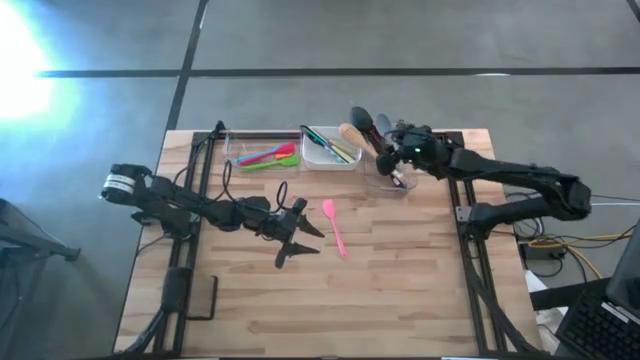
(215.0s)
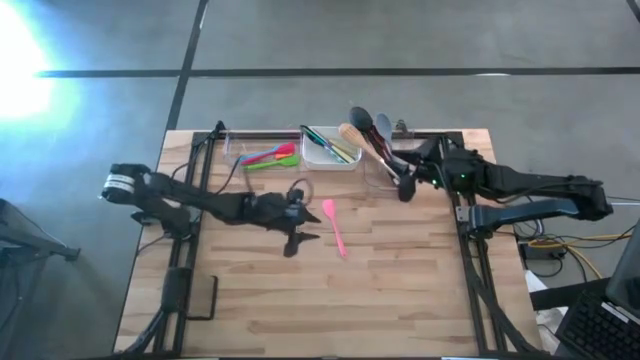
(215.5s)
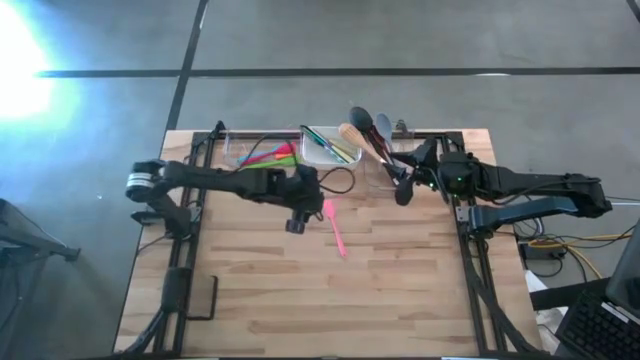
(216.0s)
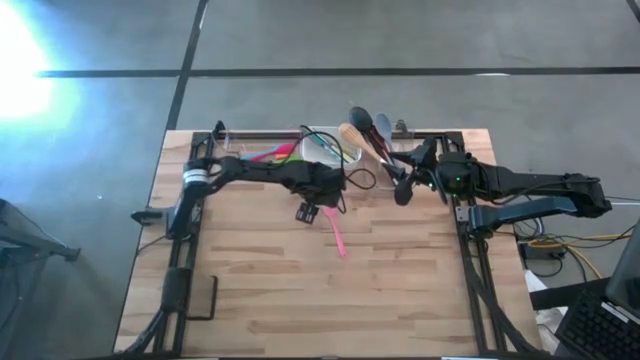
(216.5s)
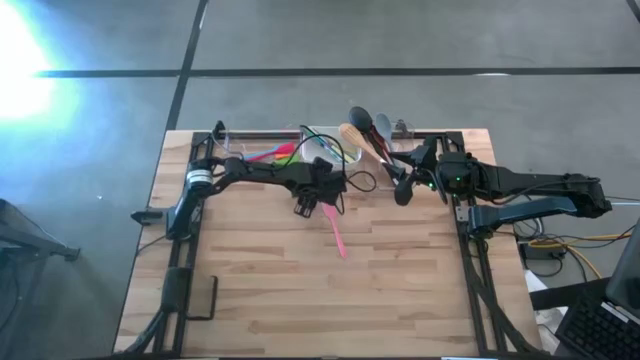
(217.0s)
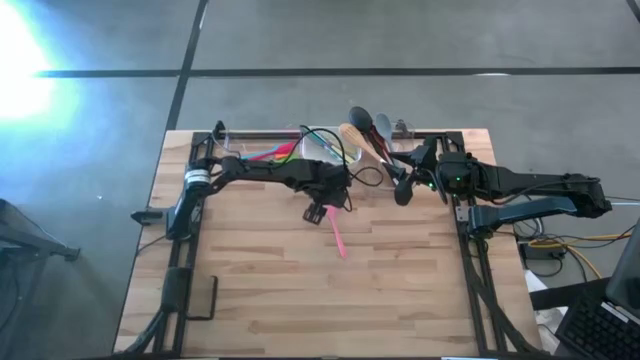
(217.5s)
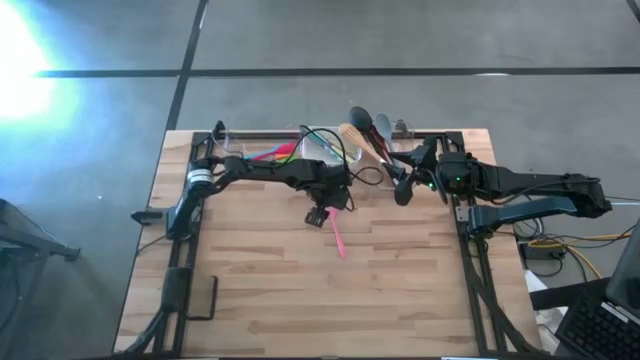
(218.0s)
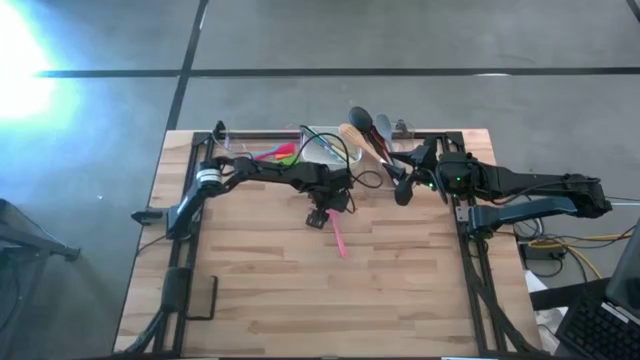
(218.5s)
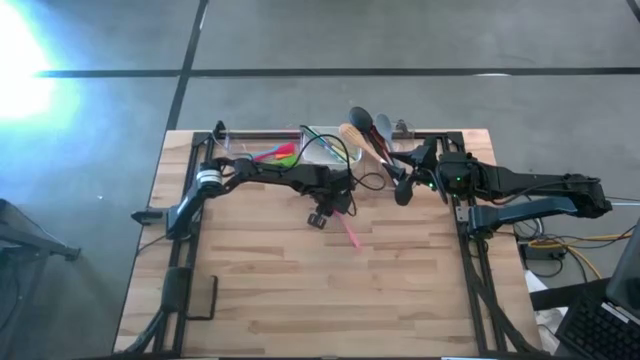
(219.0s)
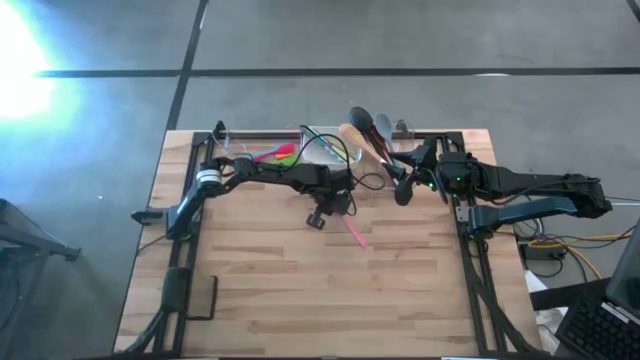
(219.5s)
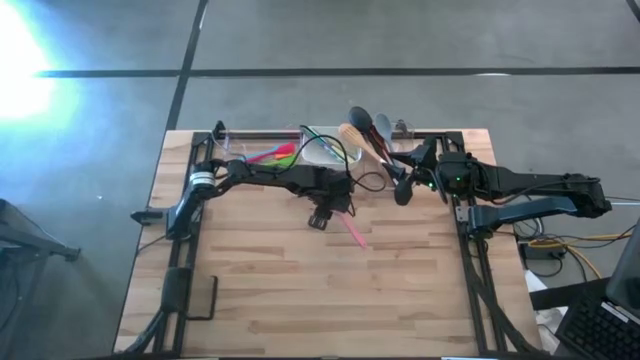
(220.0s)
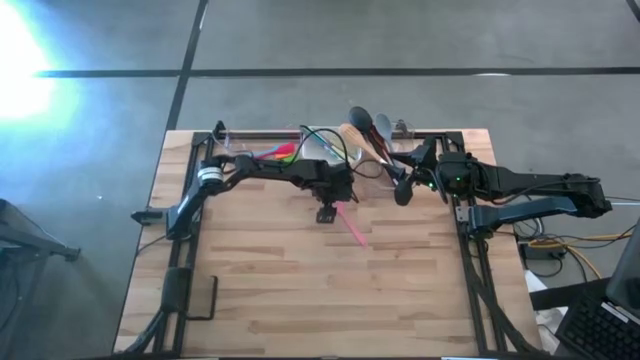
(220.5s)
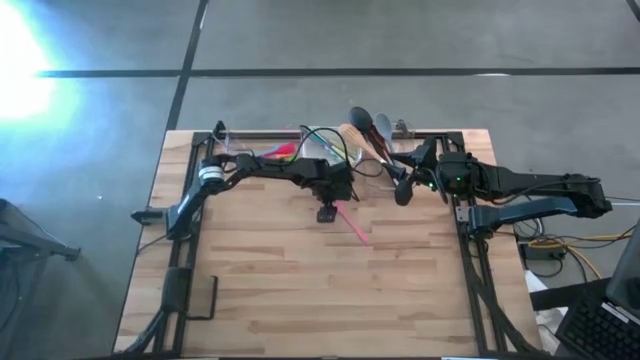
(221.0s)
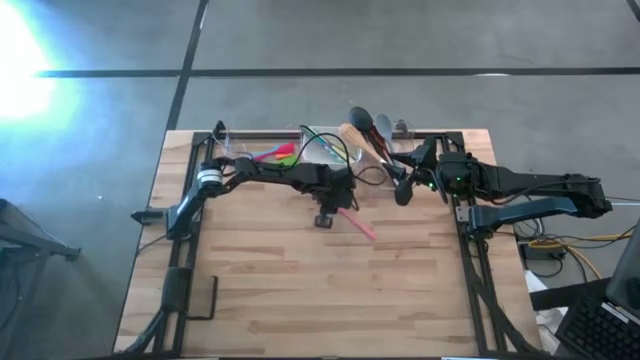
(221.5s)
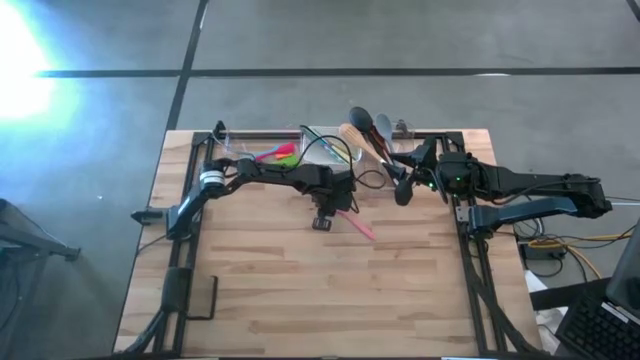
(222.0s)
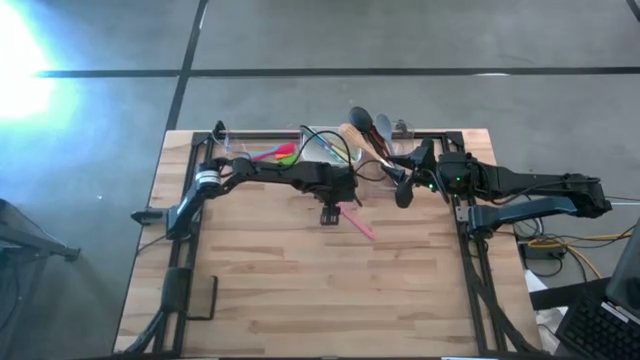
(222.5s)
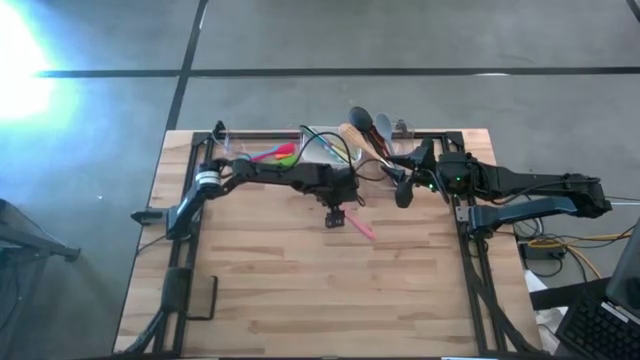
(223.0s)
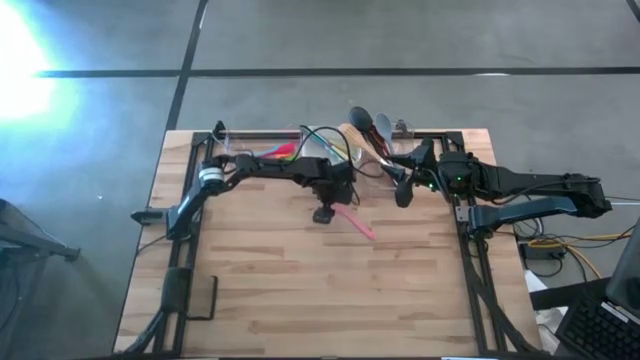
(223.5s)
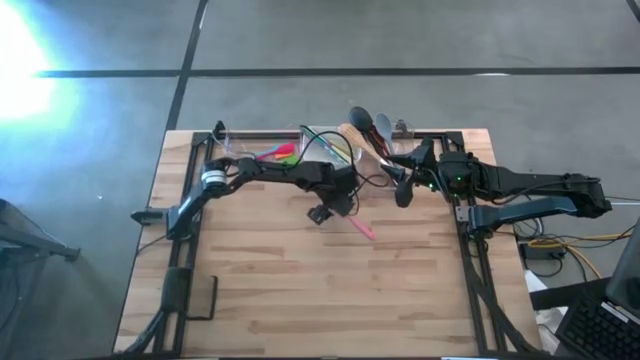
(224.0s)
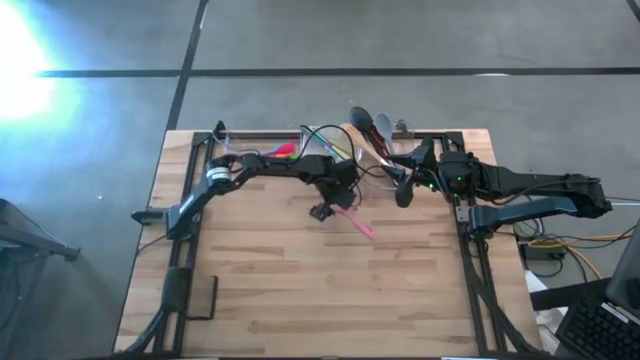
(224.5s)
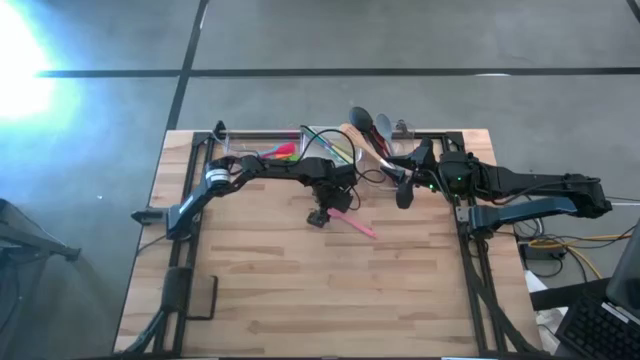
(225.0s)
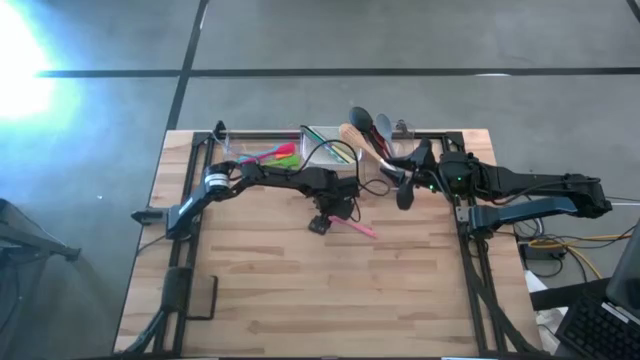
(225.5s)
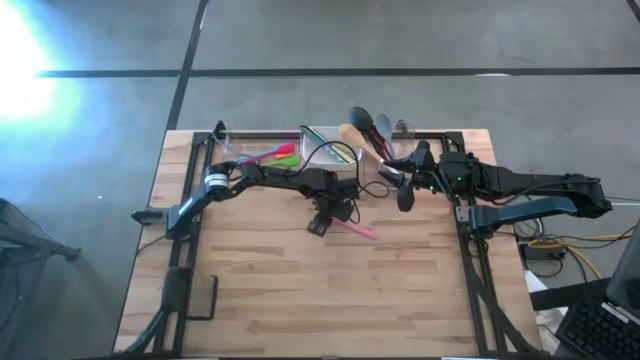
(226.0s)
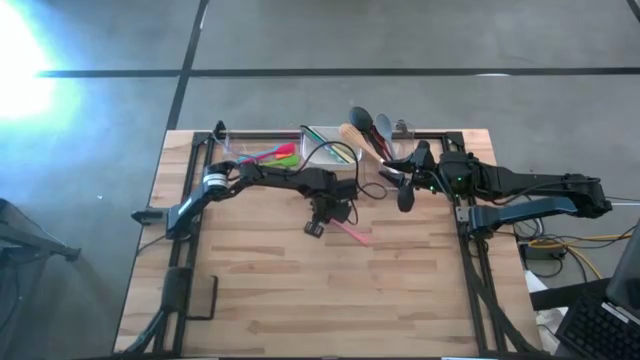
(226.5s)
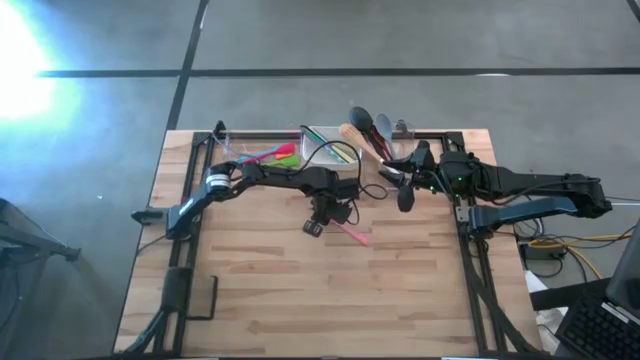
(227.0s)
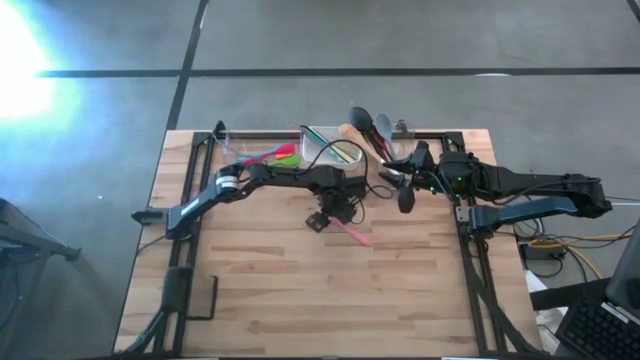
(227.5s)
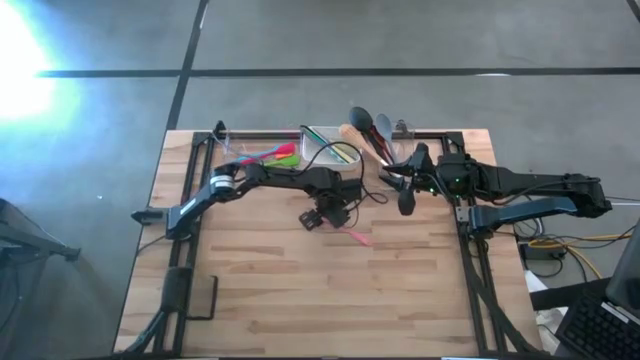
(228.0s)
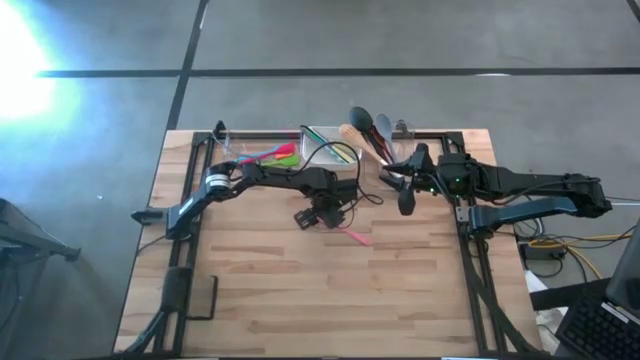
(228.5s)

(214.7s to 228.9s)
Task: Pick & Place Kitchen Items
Put the pink spatula into the left transparent bin

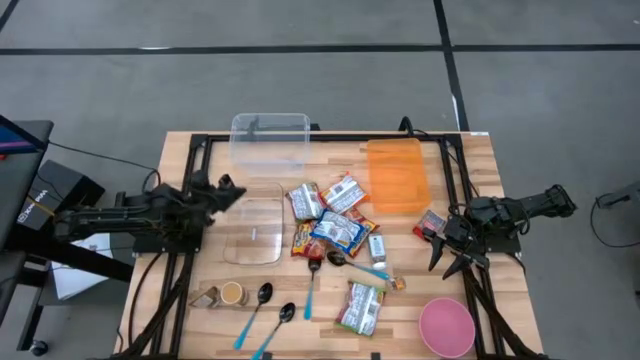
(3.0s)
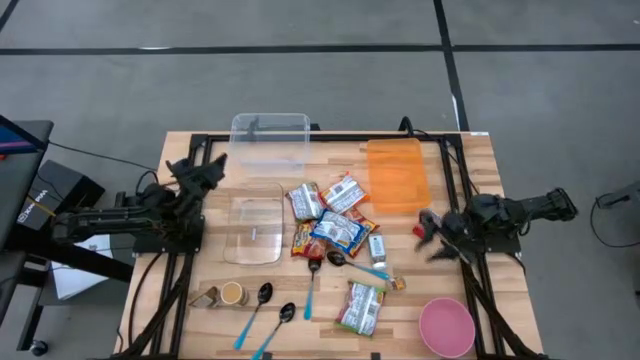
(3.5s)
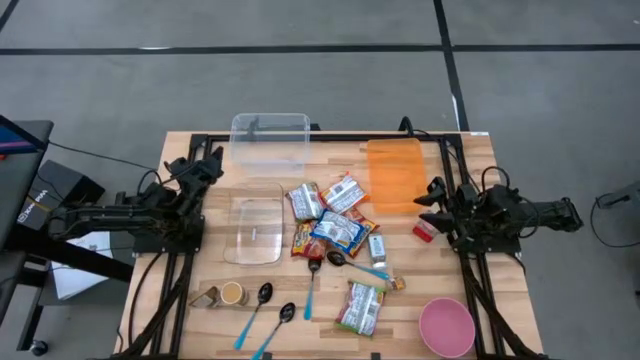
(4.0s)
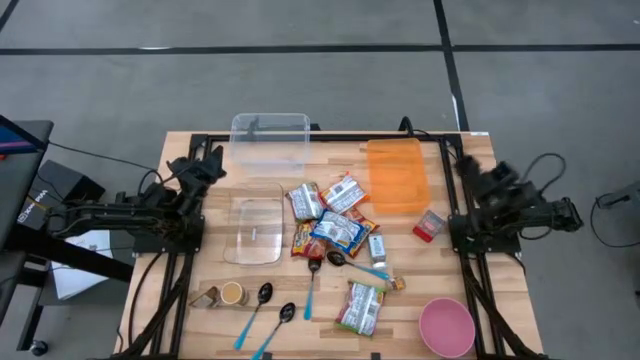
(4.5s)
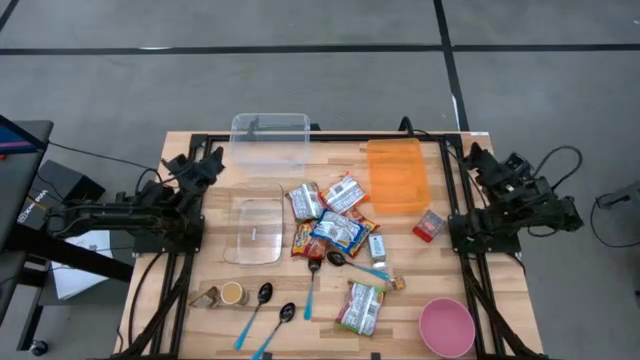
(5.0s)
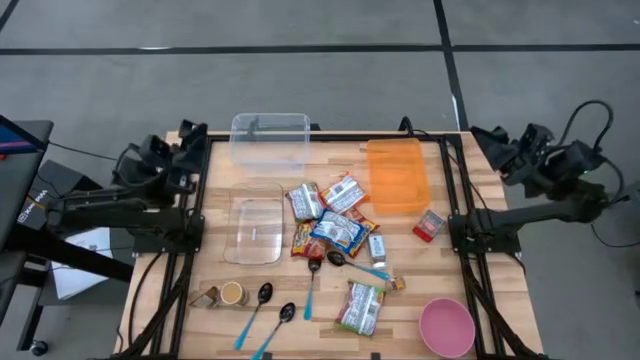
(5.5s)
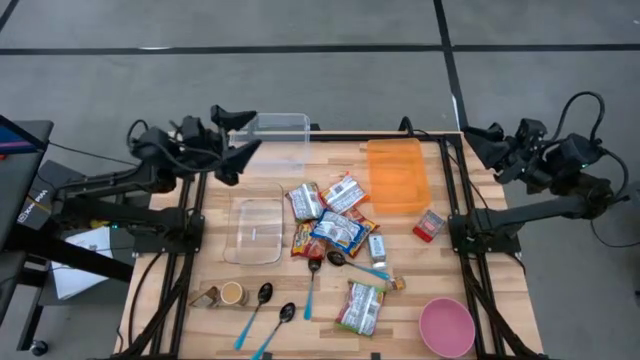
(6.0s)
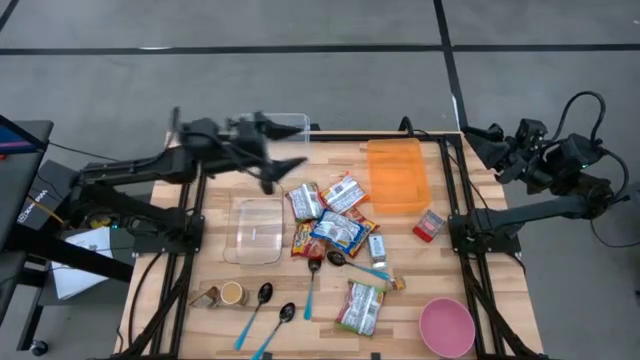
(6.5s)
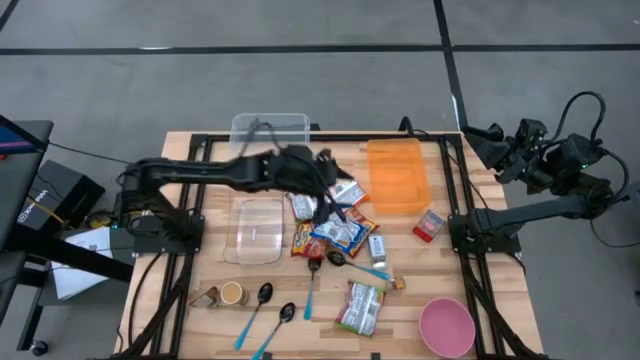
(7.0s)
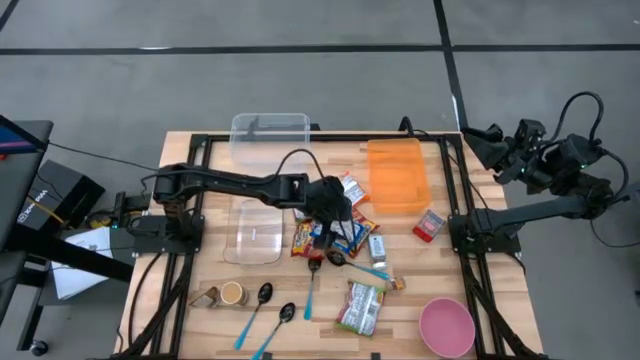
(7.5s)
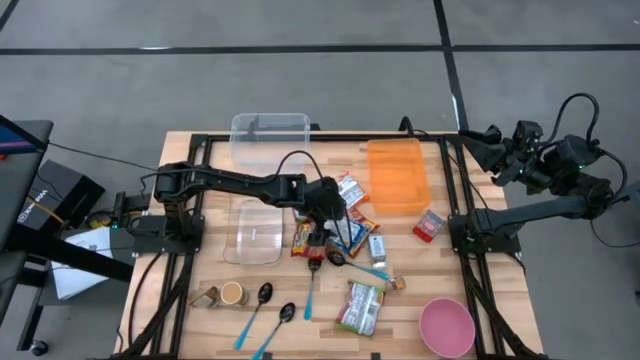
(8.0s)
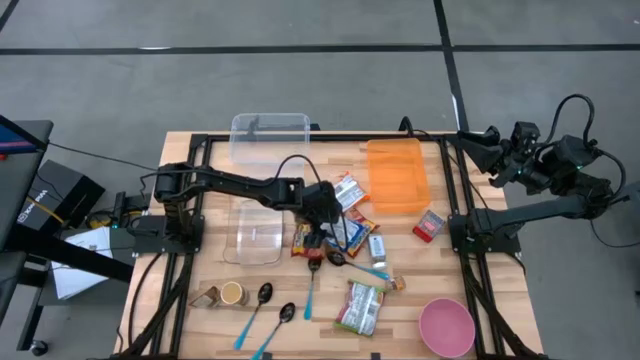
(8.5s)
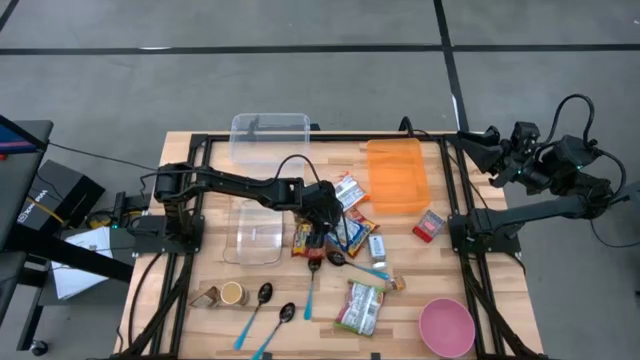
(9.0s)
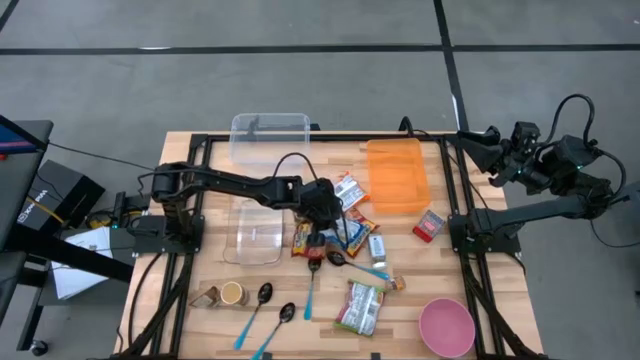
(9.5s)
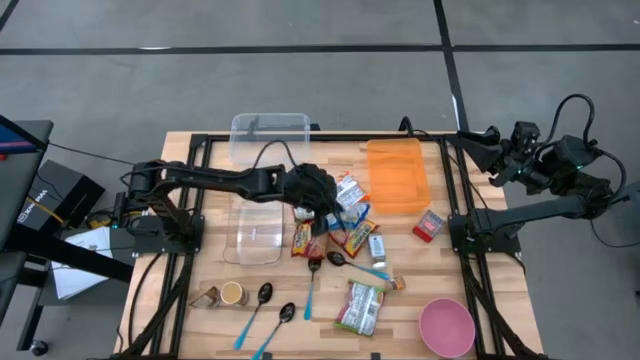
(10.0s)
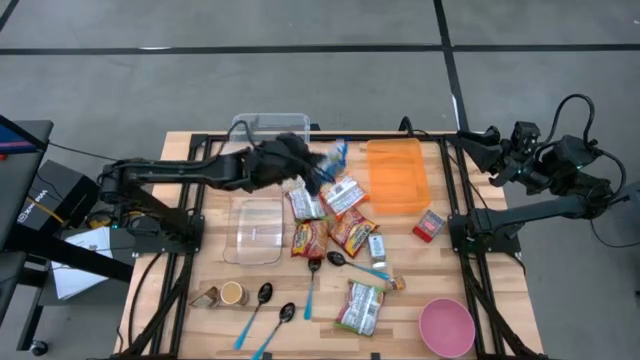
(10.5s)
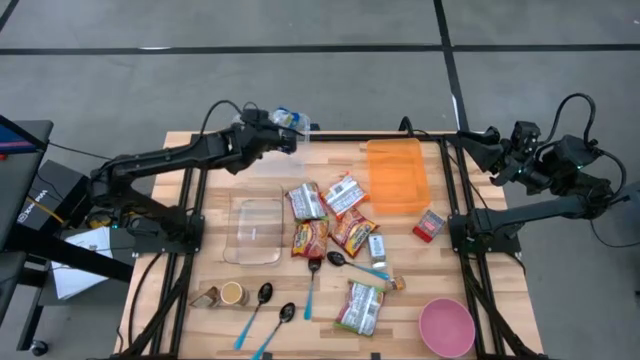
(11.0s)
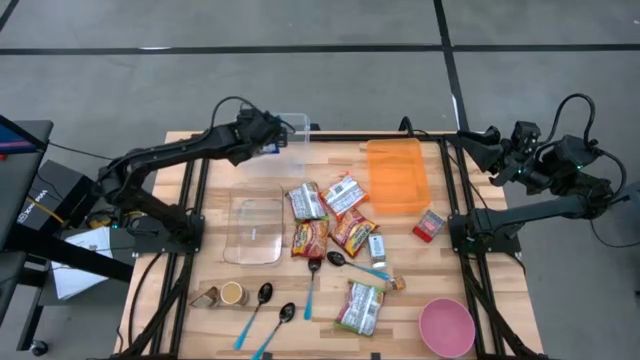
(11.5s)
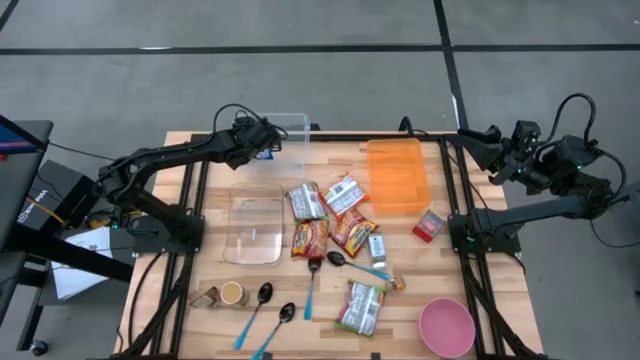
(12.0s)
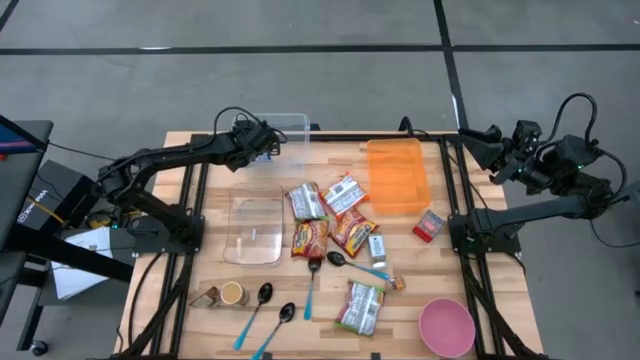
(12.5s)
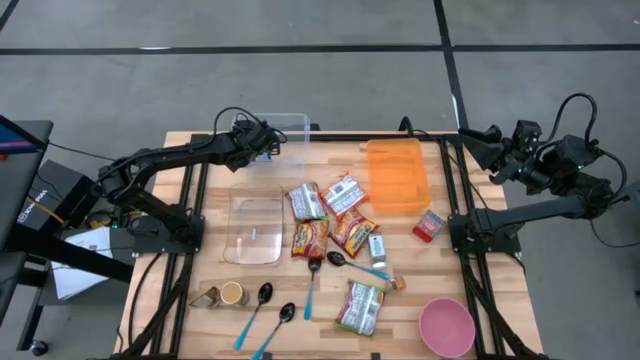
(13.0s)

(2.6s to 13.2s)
Task: Pick & Place Food Item
Put the blue instant noodles into the top left first transparent container
